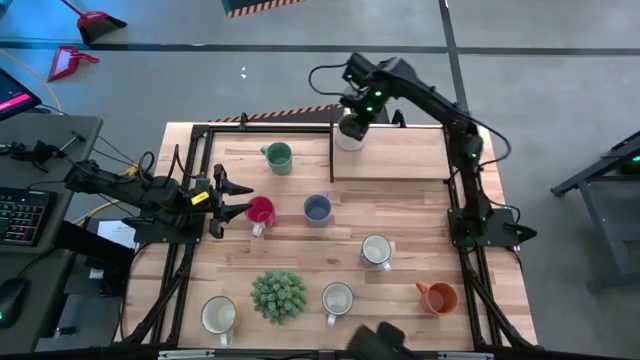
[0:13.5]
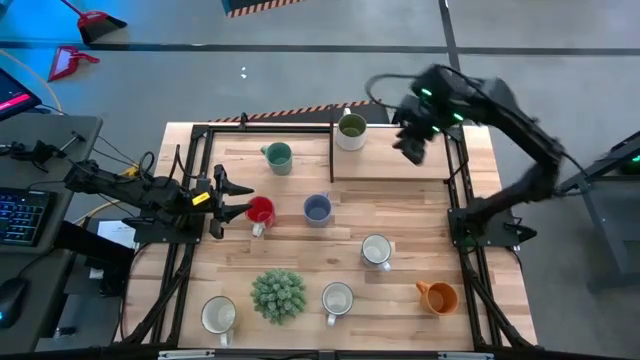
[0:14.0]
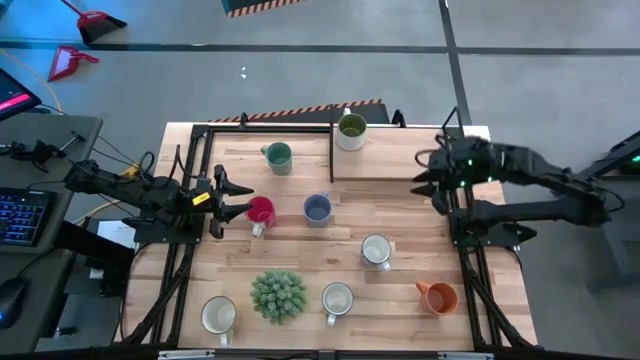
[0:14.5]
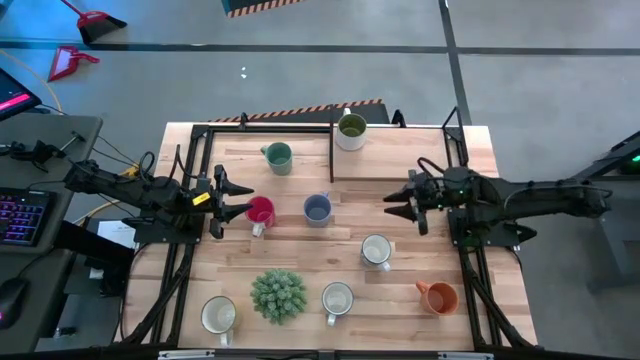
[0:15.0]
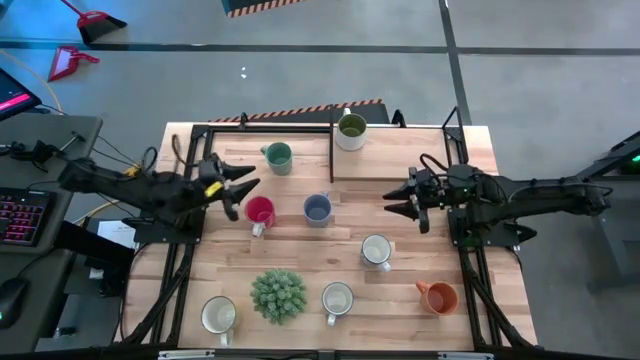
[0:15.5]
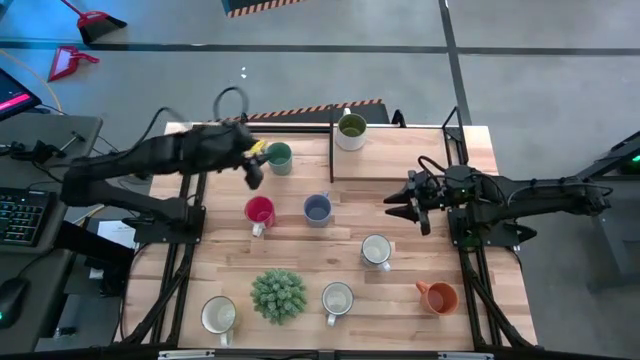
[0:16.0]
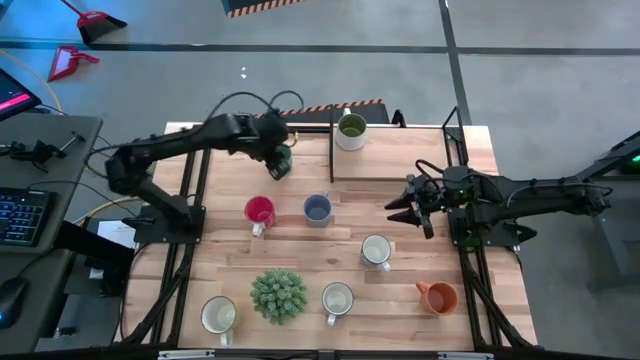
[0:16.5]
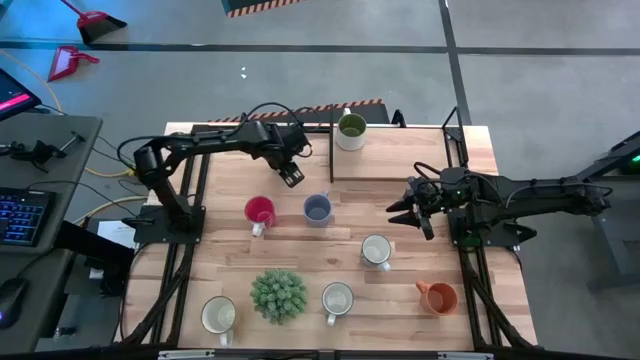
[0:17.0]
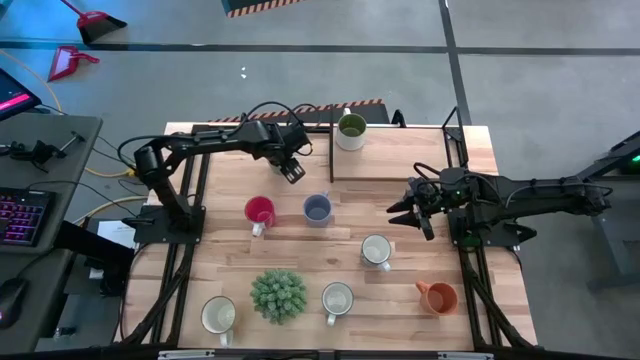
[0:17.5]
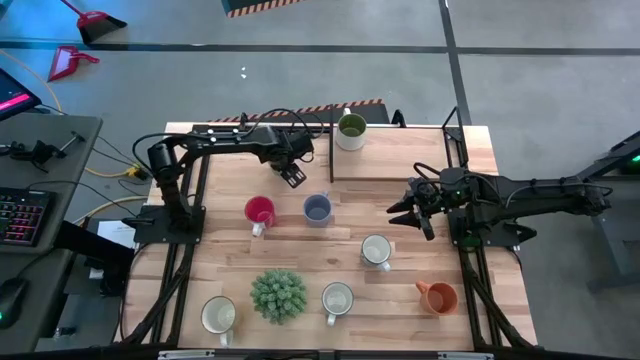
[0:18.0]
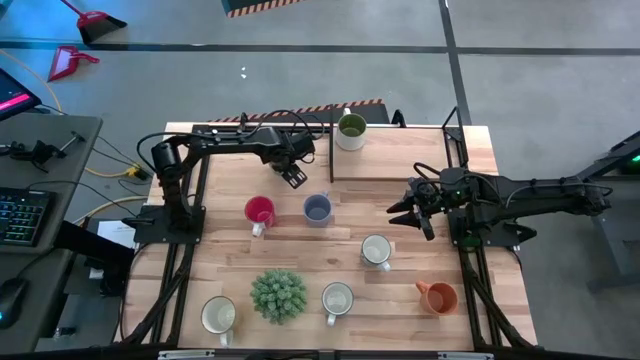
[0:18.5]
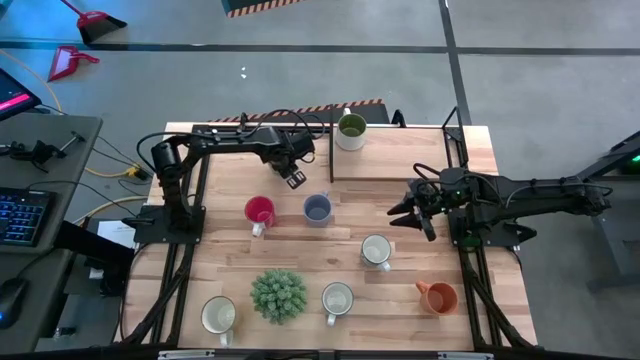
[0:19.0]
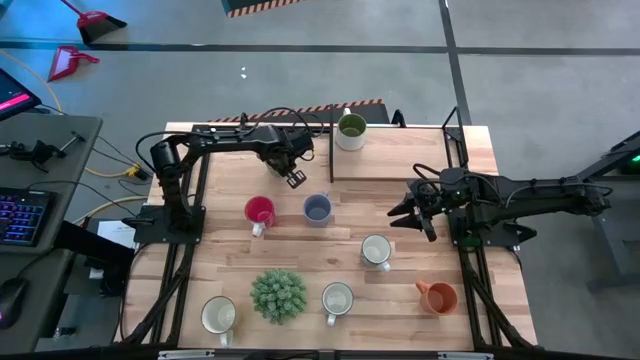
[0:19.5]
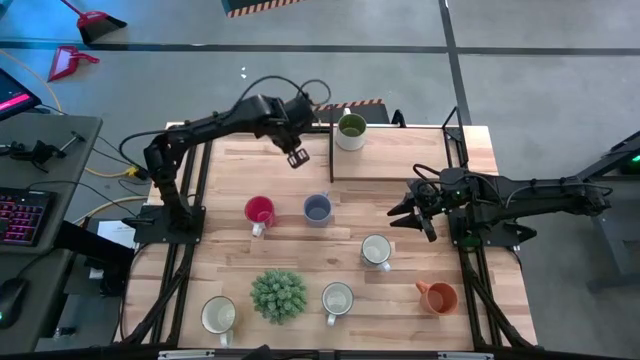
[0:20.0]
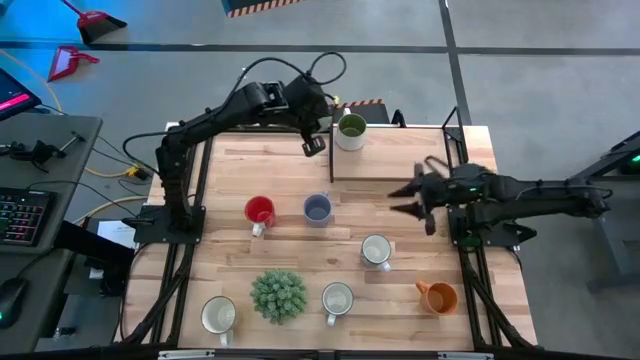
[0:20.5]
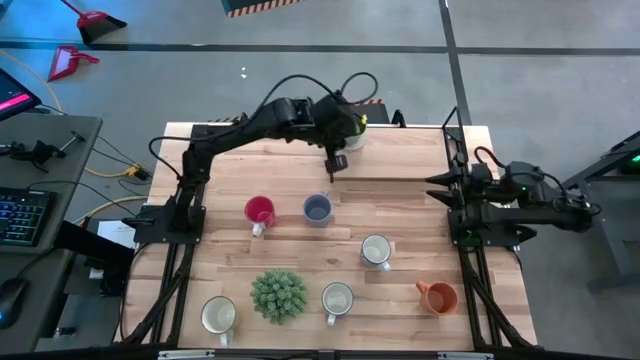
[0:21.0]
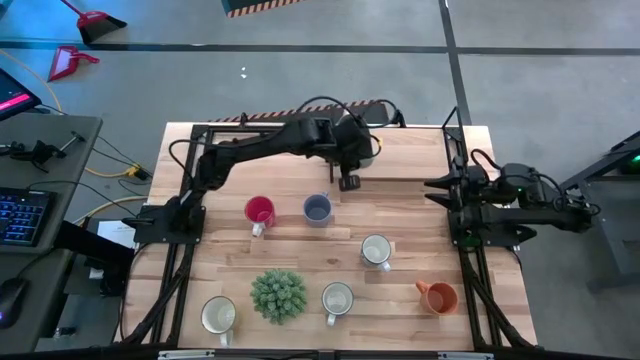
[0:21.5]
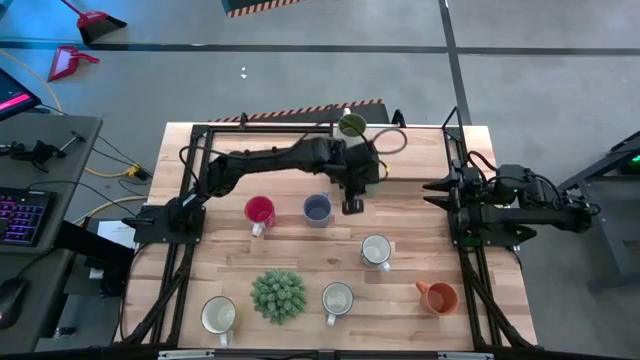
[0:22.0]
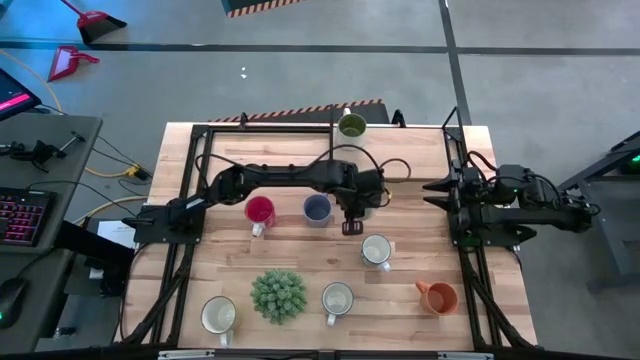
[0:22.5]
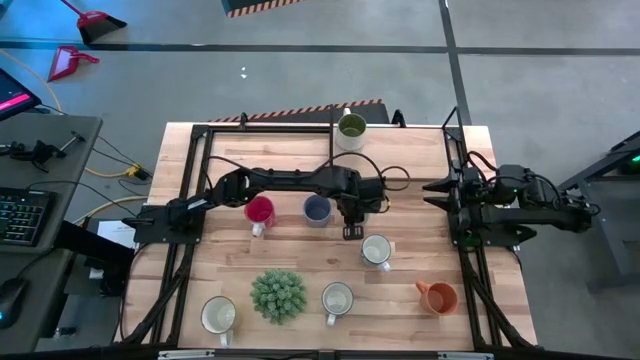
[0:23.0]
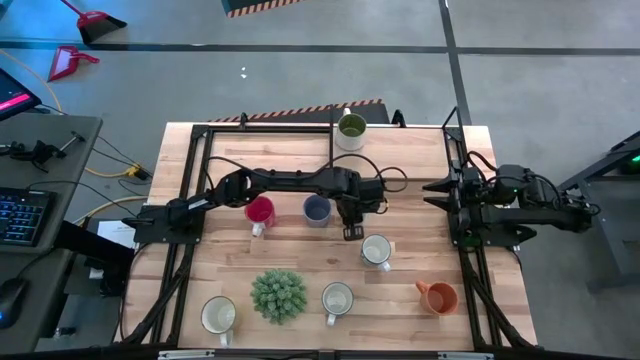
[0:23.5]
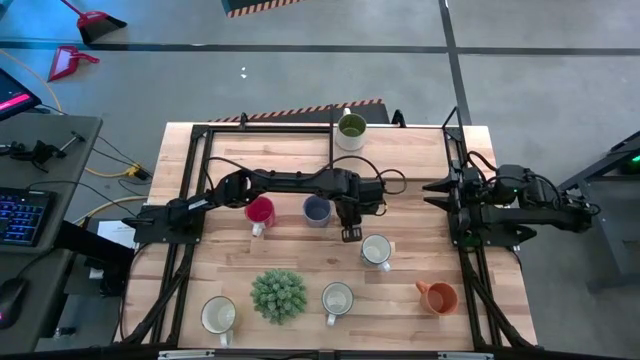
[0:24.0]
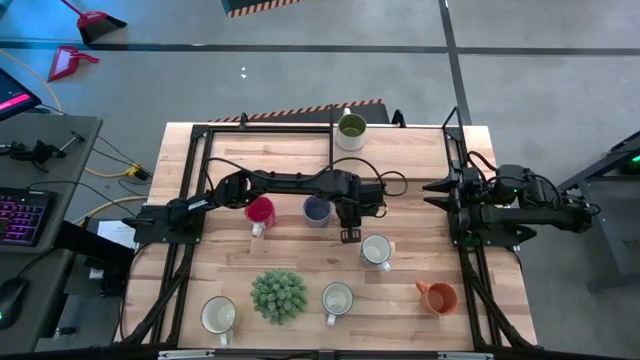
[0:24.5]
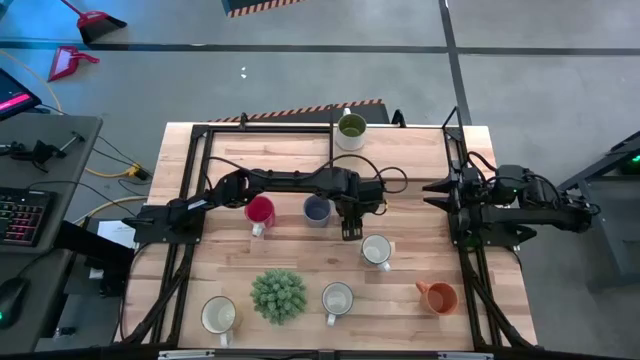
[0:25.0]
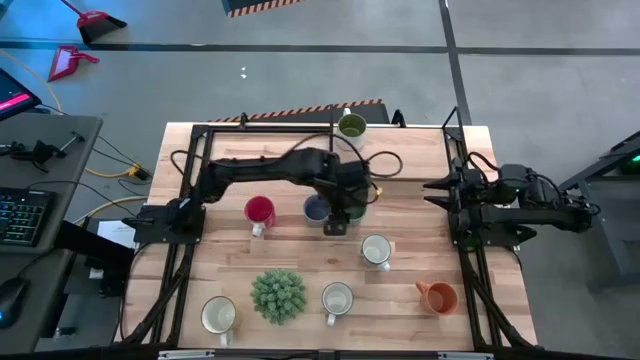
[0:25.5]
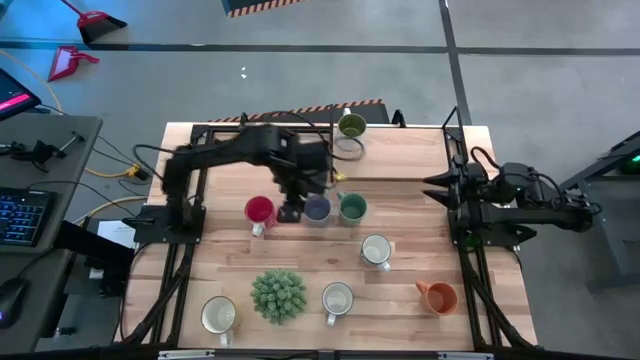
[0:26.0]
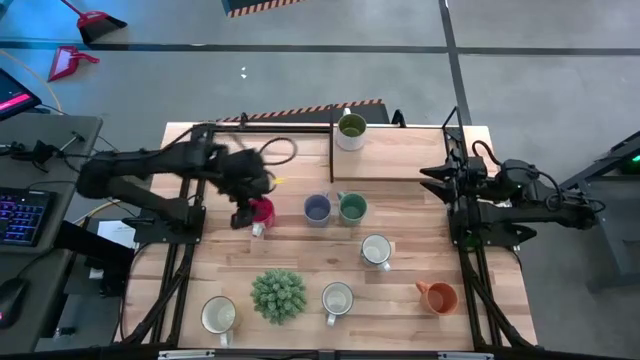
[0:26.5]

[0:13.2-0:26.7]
Task: Place coffee mugs
Put the light green mug on the shelf
